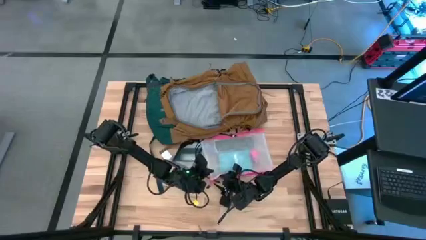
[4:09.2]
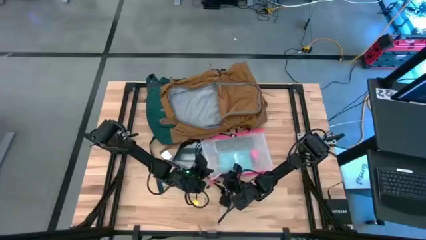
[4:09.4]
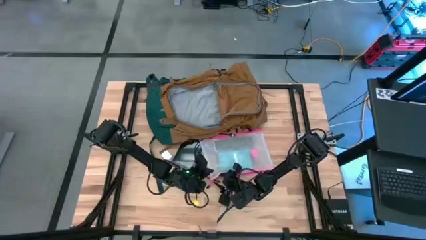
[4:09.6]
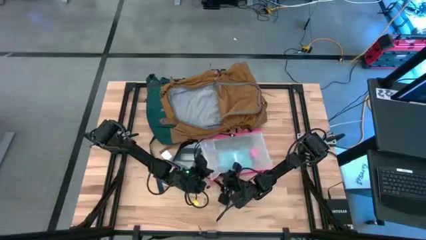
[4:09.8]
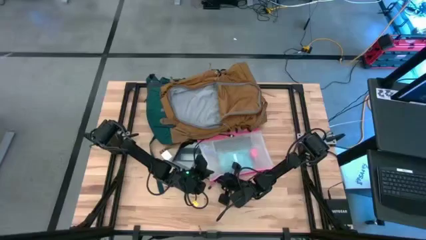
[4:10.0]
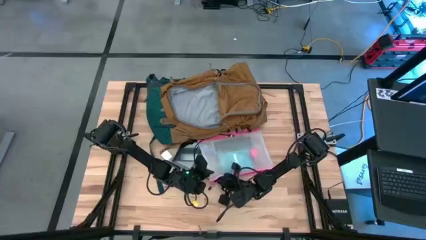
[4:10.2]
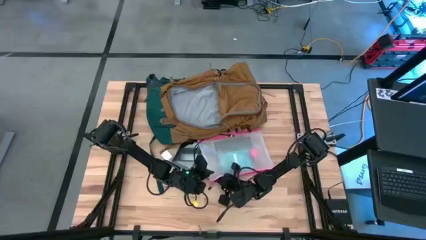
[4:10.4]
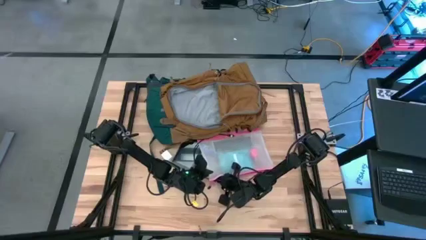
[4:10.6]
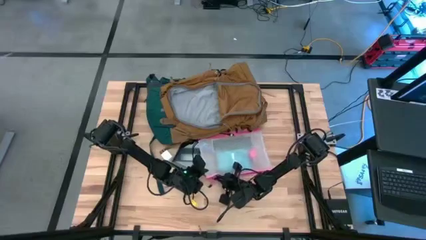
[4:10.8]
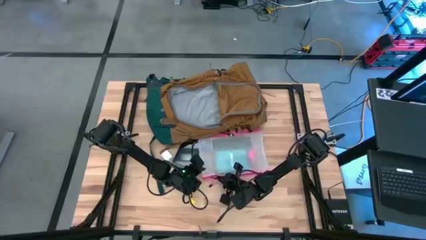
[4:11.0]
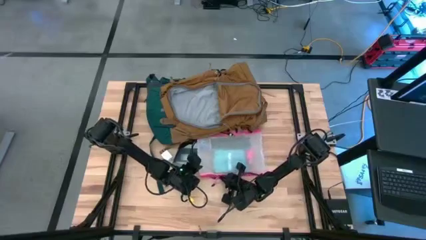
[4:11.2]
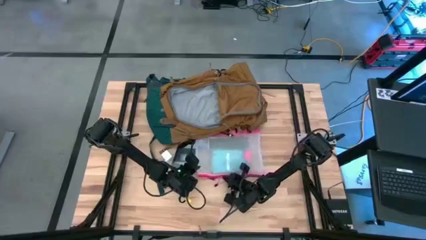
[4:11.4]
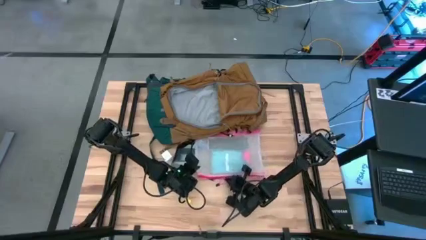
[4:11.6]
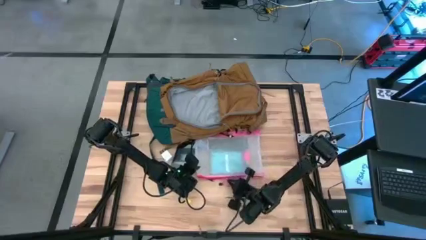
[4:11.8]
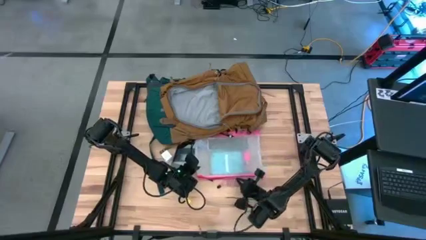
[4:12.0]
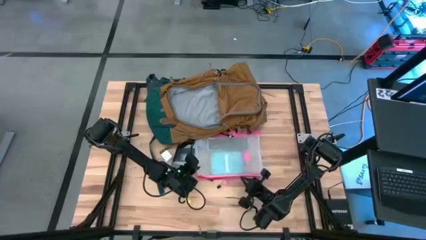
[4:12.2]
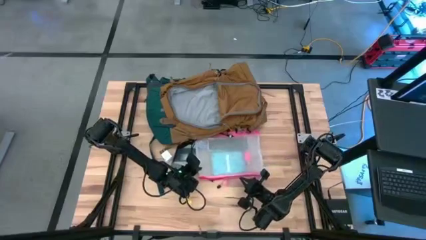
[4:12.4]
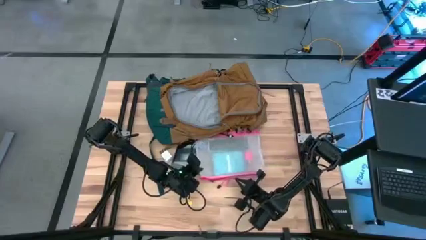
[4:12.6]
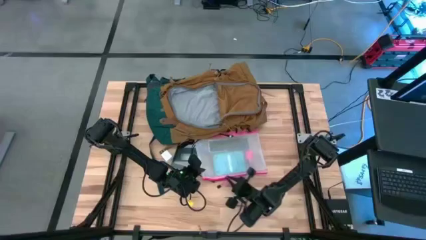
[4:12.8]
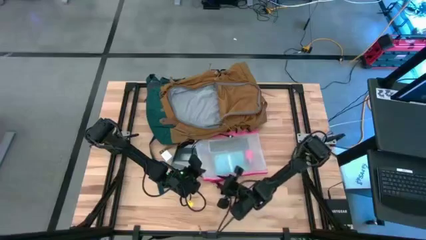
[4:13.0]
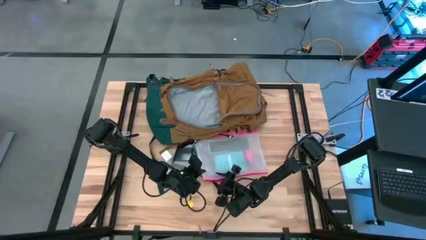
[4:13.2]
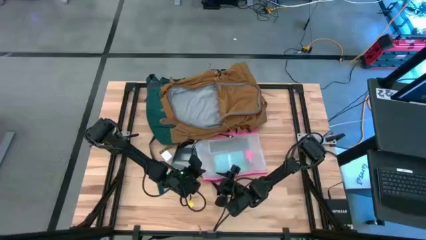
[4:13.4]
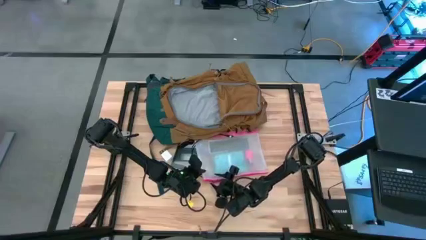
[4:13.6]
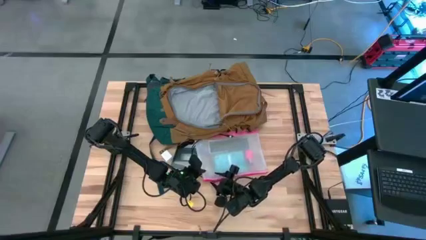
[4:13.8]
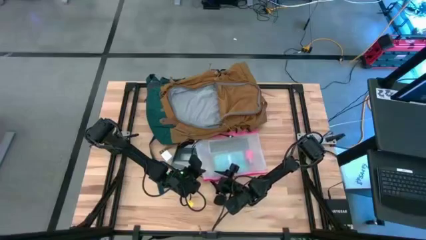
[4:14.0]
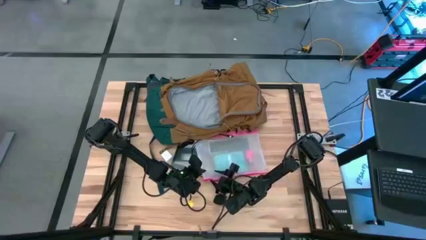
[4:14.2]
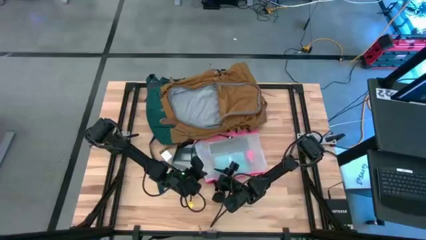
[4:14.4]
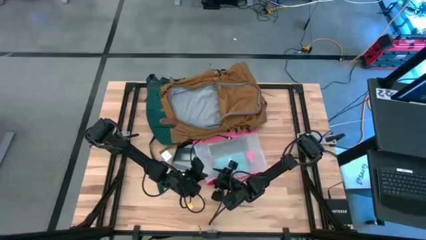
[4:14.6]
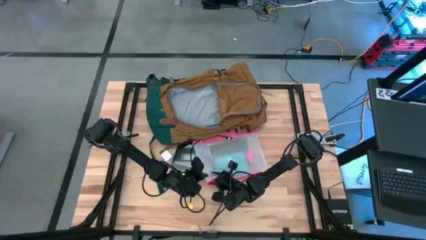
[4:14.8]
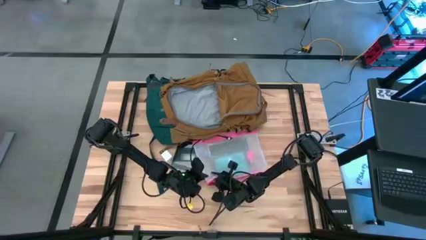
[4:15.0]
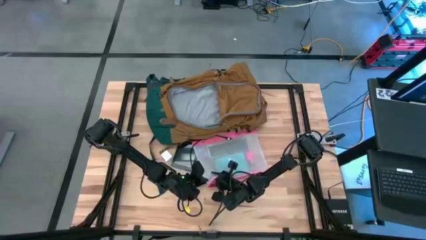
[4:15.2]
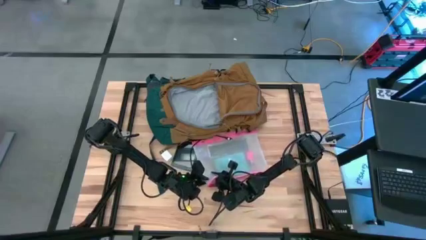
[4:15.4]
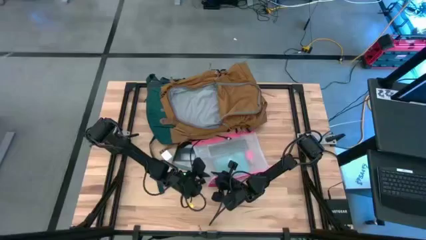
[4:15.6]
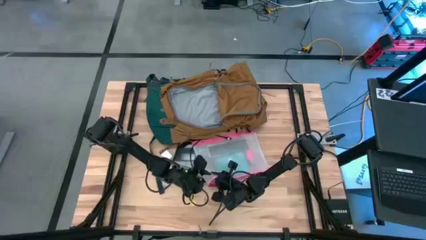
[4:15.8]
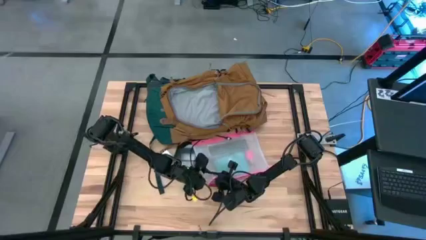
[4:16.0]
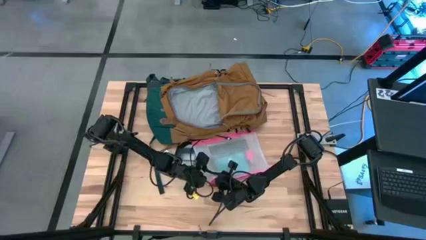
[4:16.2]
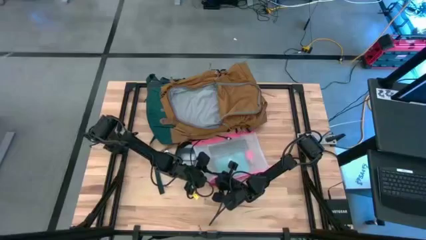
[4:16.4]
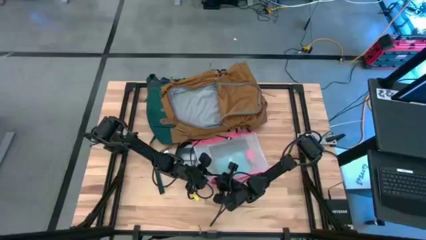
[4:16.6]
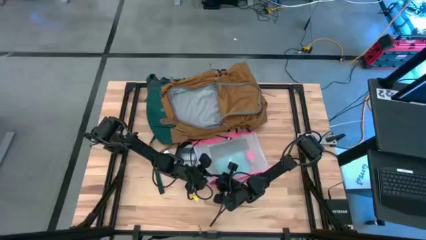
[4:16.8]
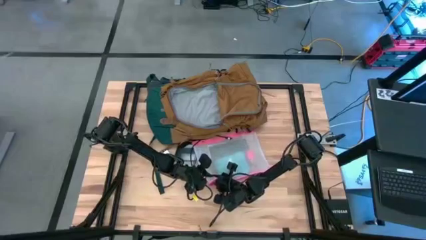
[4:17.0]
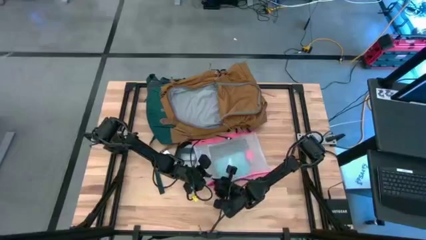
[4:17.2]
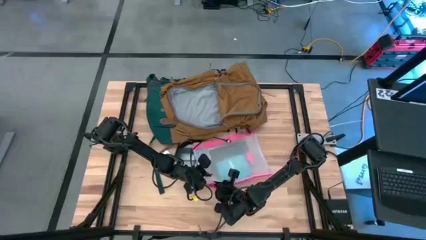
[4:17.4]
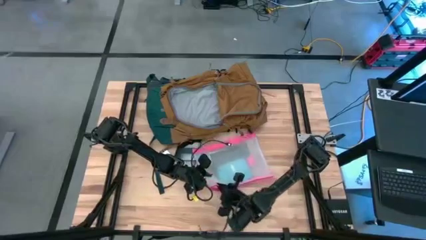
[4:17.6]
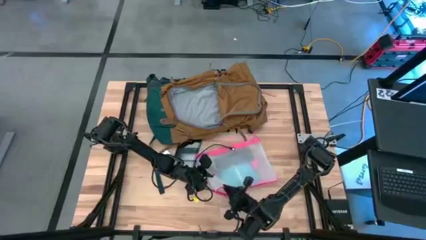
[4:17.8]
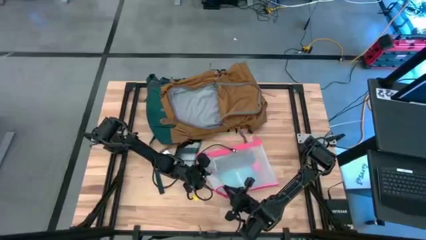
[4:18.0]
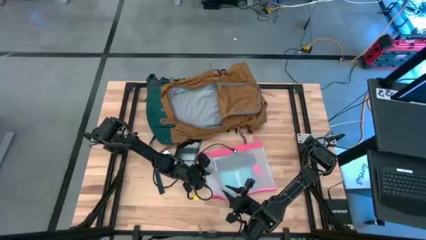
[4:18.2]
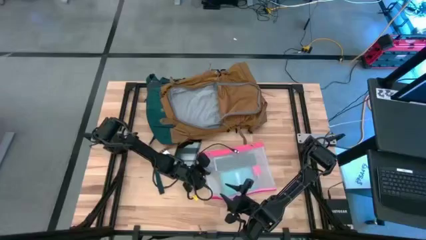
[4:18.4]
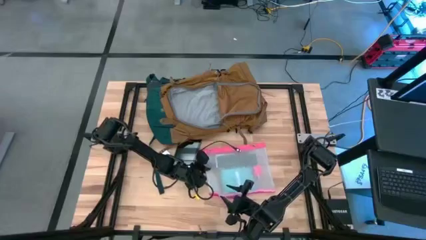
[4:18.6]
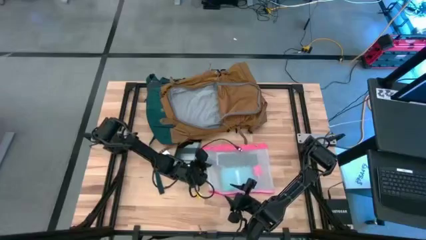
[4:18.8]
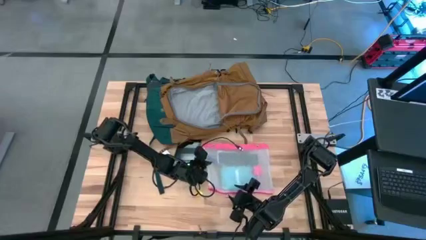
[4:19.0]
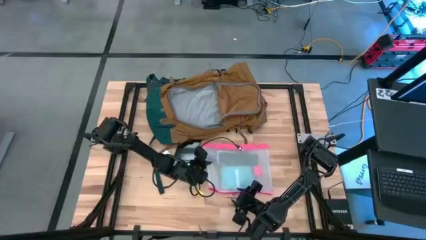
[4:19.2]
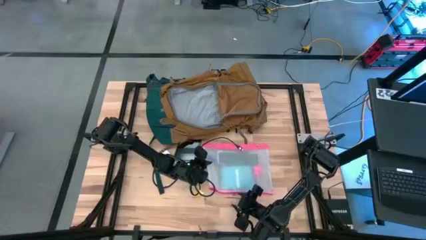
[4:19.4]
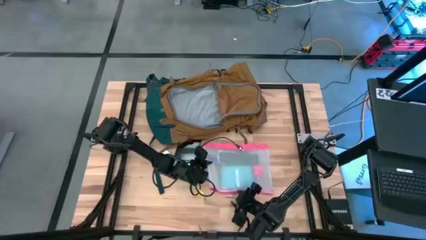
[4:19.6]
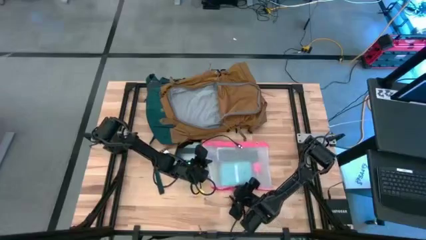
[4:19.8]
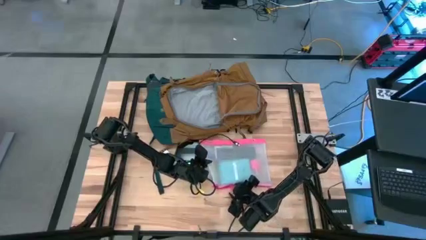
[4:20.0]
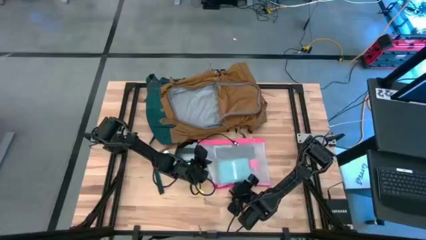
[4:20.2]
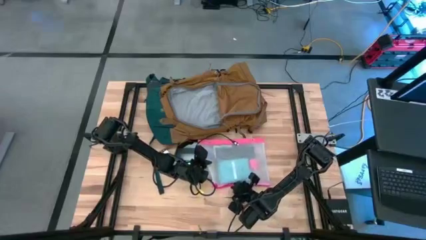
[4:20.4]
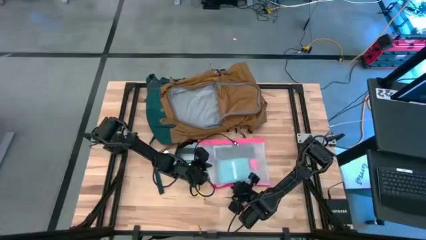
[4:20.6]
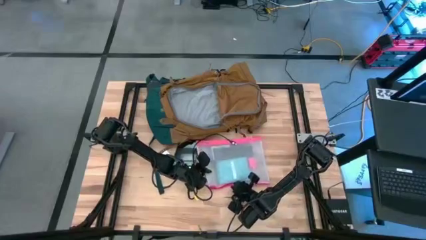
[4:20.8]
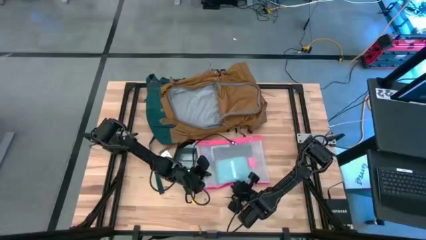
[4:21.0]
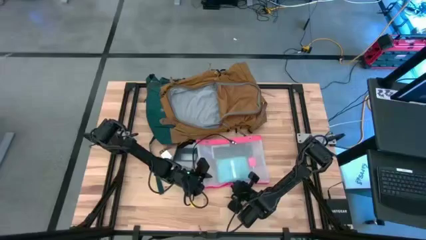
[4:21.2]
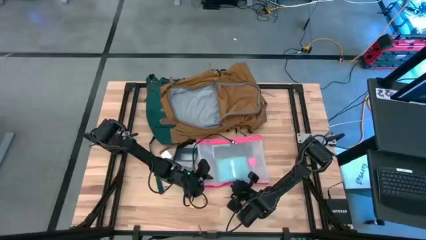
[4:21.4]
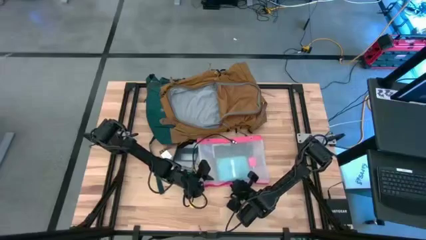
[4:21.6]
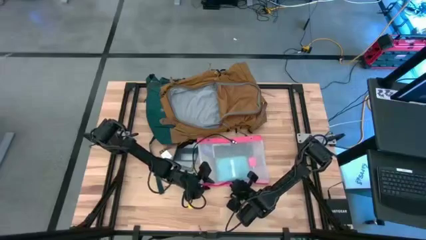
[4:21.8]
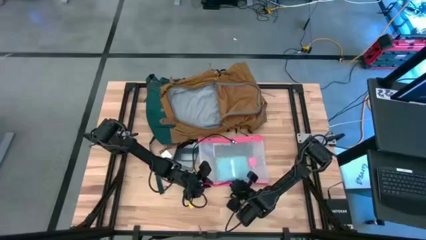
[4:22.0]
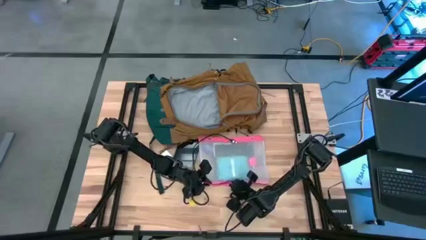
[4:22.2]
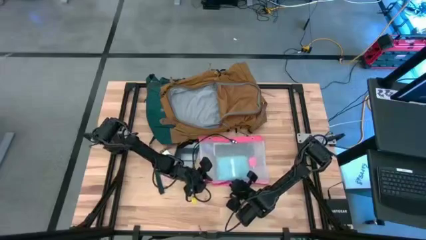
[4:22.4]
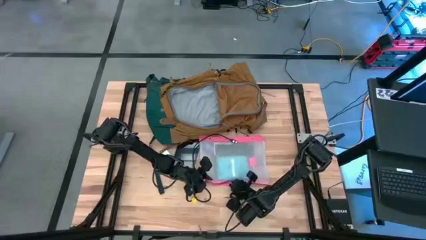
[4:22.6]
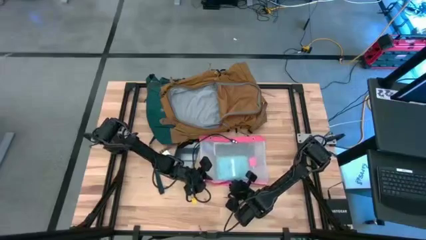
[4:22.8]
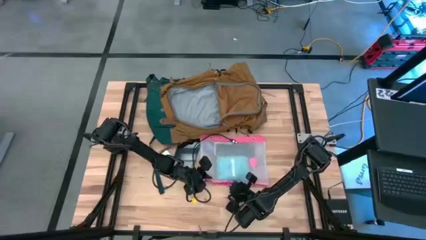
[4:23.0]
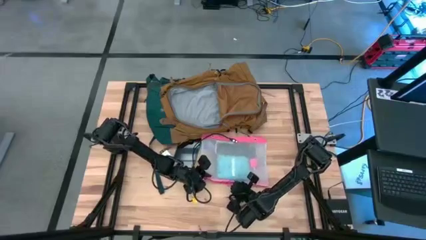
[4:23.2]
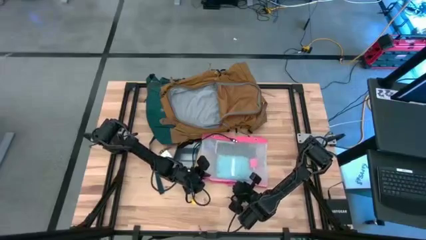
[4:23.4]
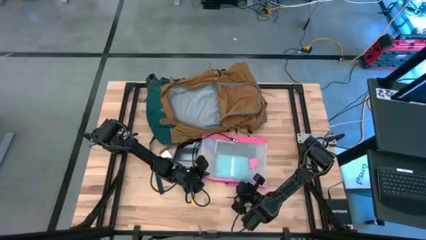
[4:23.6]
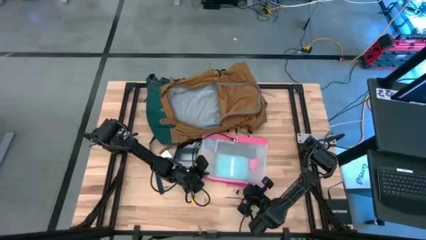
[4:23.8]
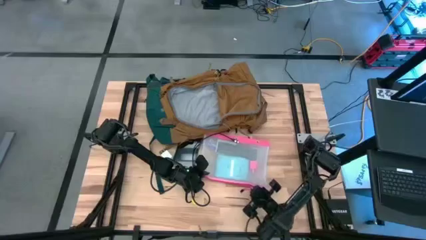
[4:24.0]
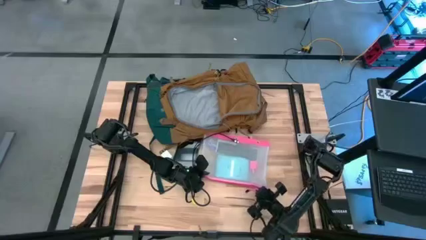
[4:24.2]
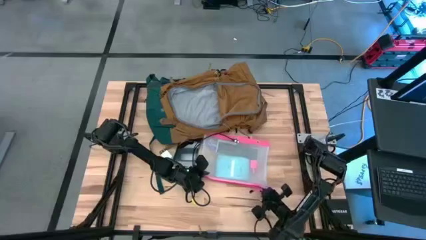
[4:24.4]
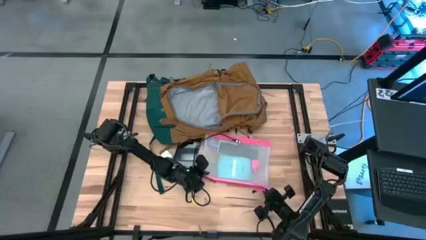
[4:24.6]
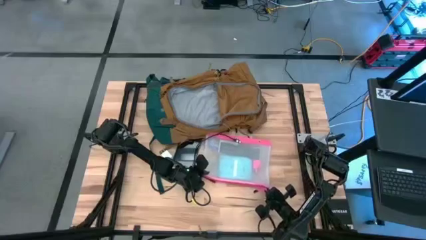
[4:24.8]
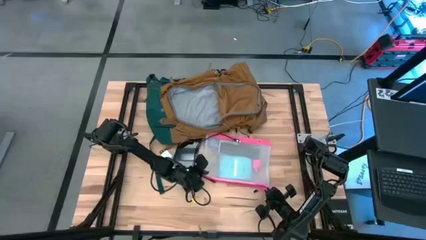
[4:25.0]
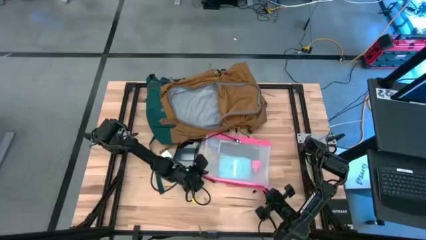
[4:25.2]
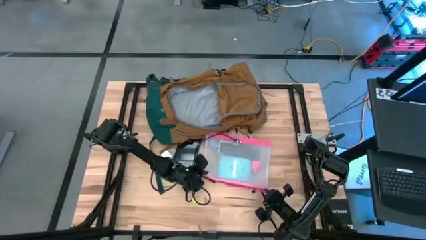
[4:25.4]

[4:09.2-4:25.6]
Task: Unpack backpack
Open the pink zipper pouch
